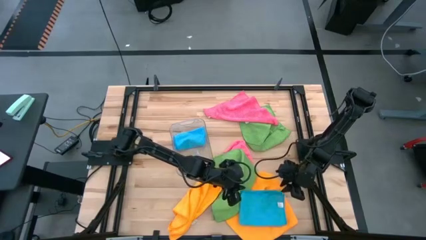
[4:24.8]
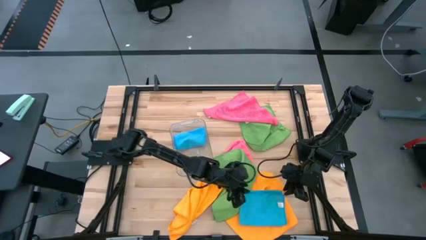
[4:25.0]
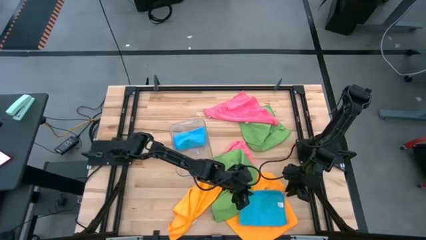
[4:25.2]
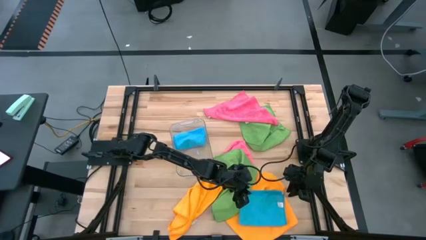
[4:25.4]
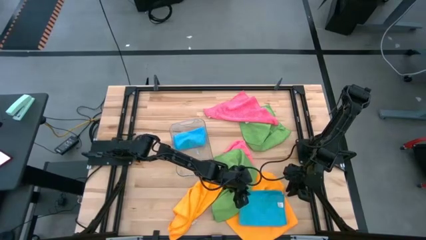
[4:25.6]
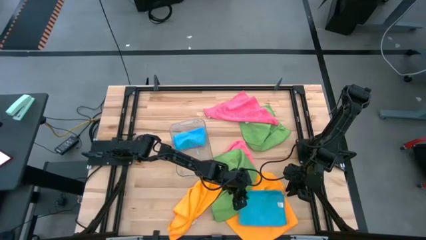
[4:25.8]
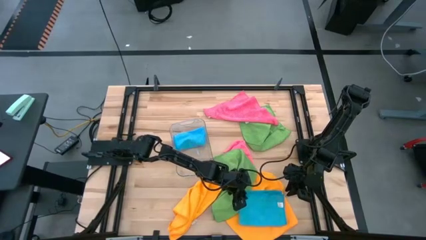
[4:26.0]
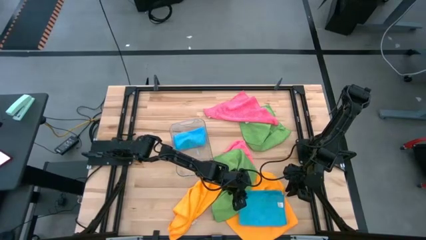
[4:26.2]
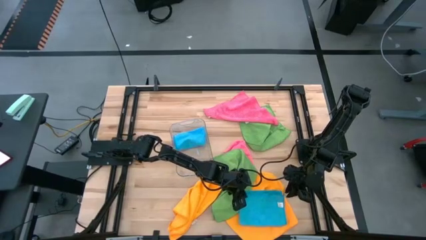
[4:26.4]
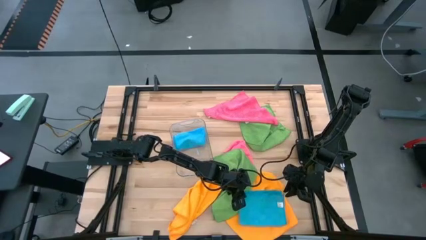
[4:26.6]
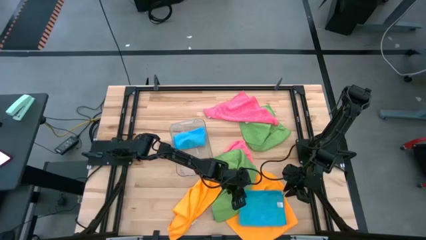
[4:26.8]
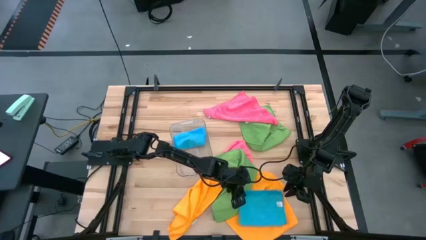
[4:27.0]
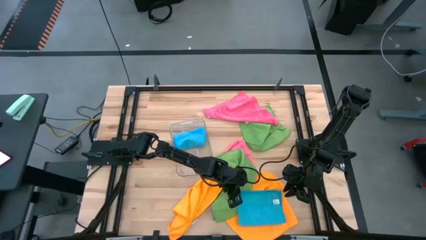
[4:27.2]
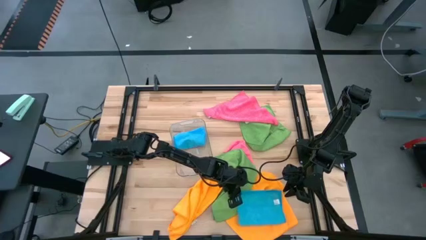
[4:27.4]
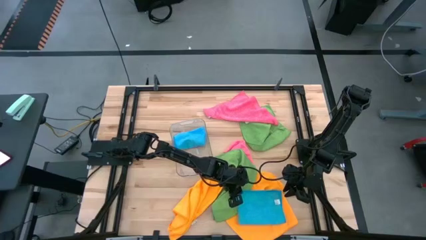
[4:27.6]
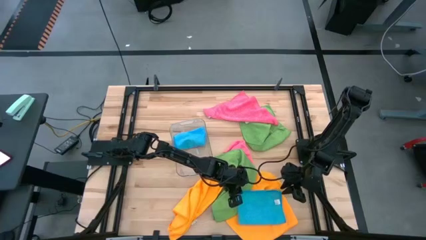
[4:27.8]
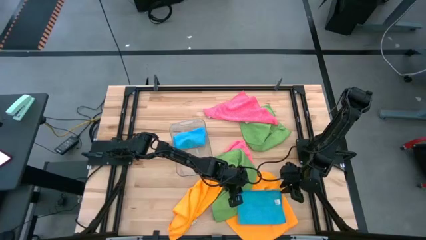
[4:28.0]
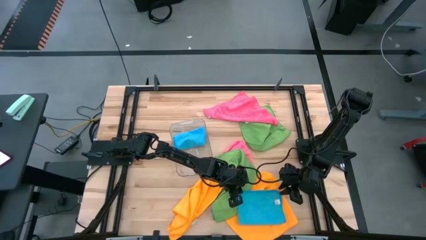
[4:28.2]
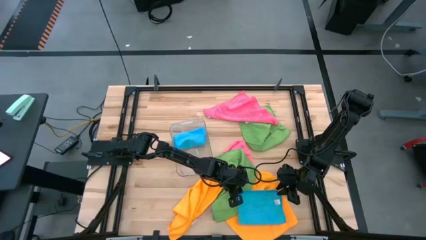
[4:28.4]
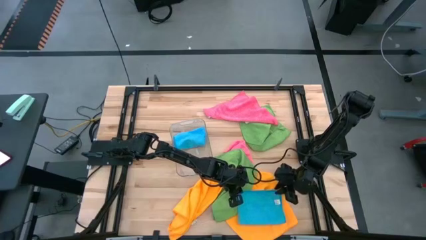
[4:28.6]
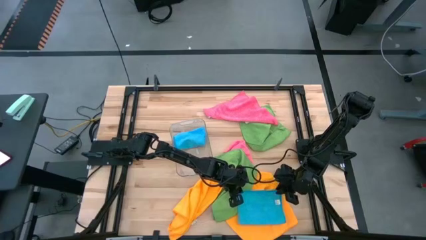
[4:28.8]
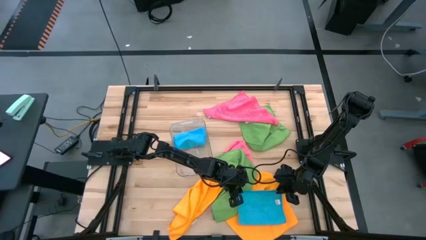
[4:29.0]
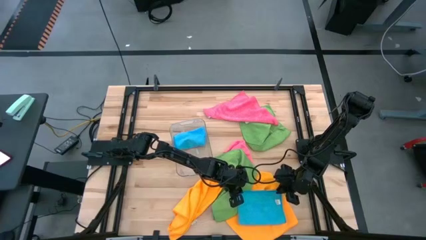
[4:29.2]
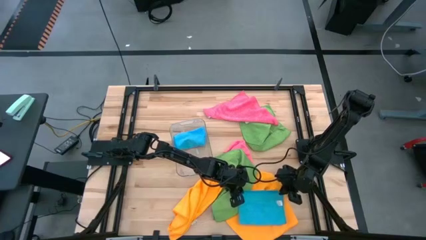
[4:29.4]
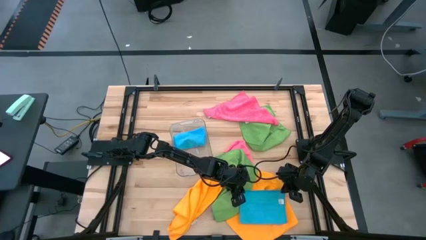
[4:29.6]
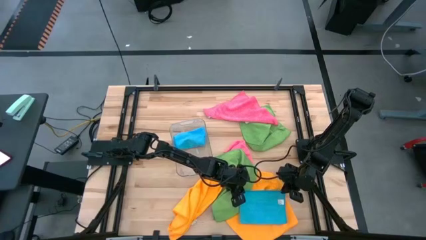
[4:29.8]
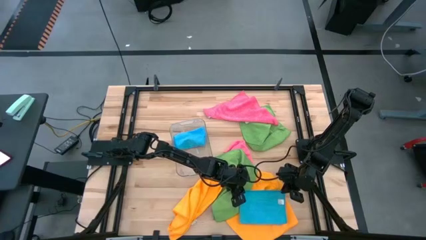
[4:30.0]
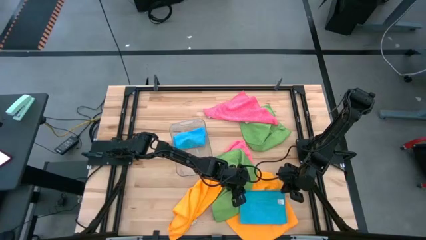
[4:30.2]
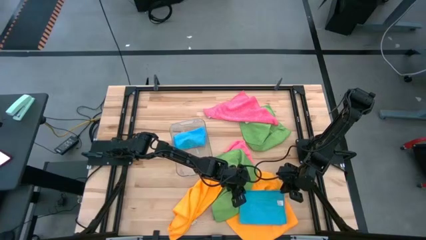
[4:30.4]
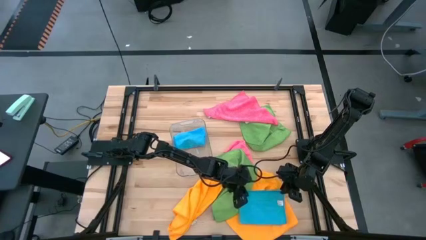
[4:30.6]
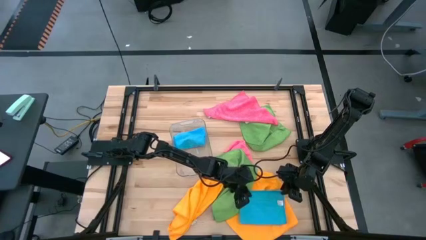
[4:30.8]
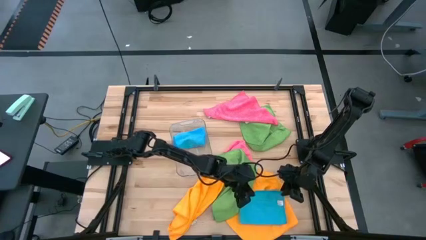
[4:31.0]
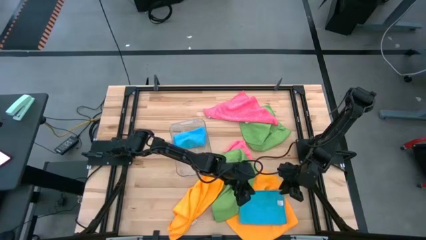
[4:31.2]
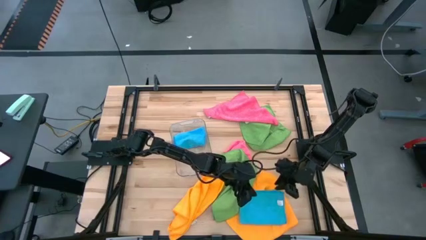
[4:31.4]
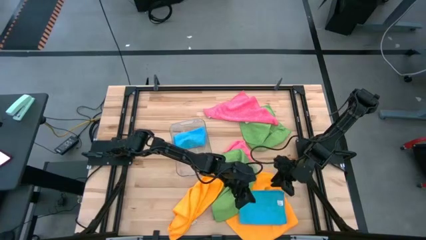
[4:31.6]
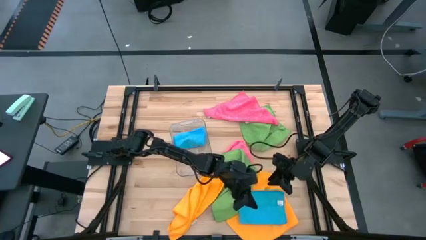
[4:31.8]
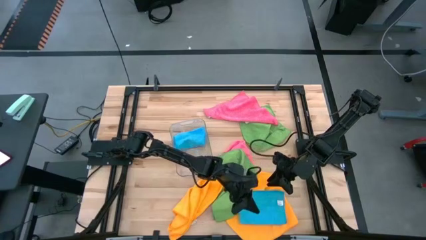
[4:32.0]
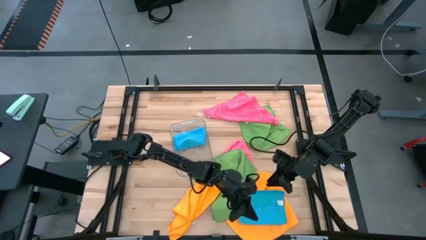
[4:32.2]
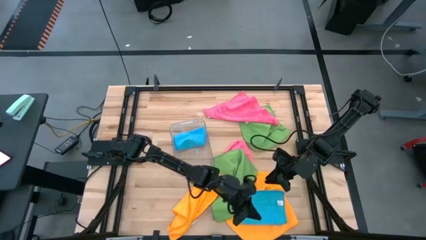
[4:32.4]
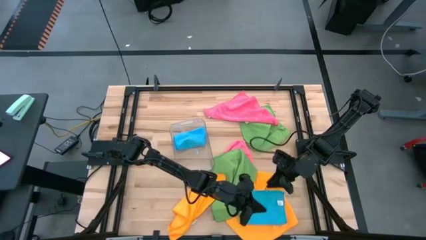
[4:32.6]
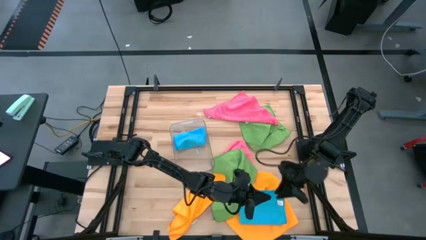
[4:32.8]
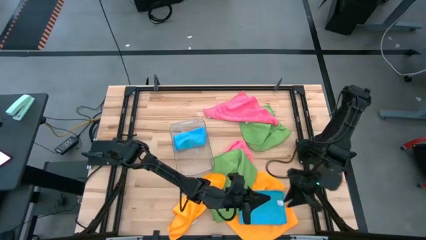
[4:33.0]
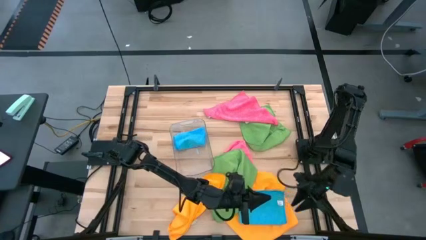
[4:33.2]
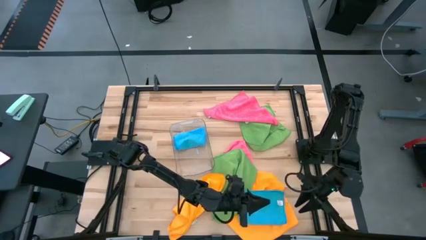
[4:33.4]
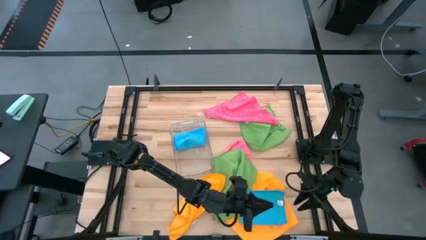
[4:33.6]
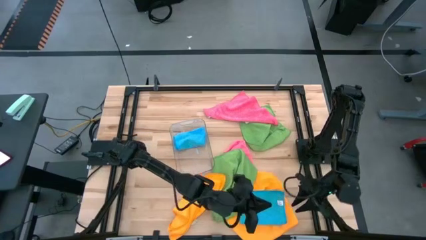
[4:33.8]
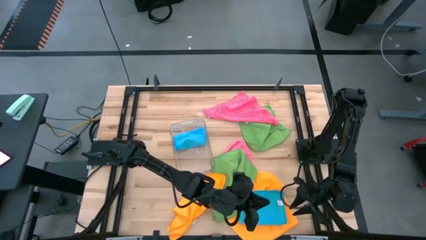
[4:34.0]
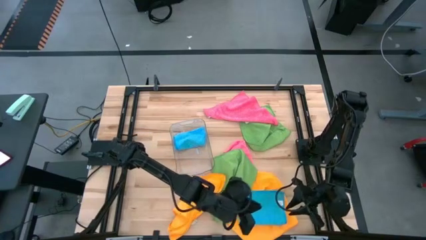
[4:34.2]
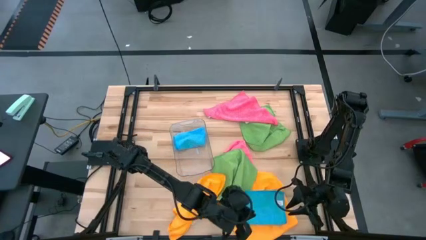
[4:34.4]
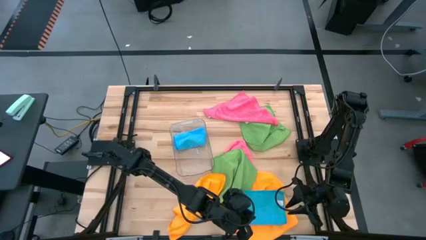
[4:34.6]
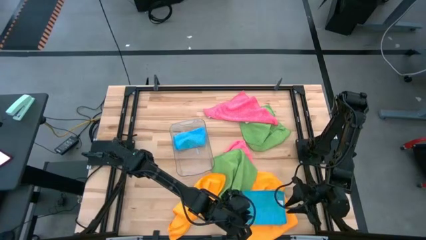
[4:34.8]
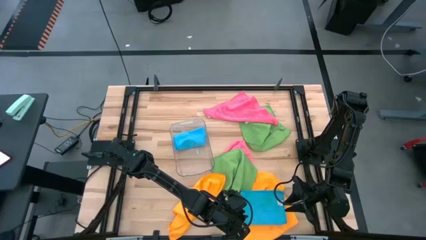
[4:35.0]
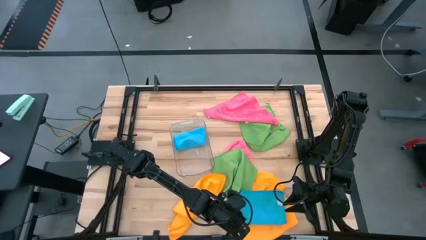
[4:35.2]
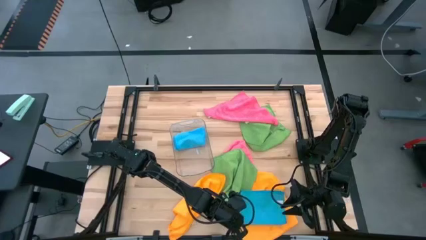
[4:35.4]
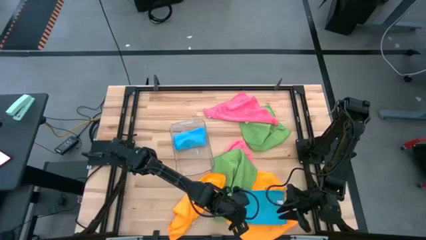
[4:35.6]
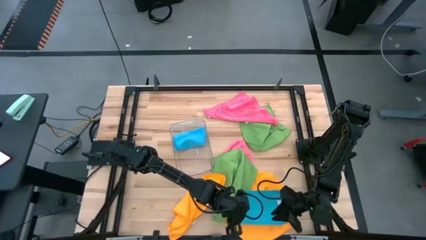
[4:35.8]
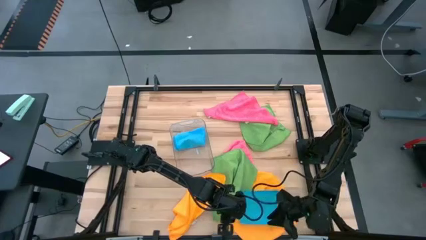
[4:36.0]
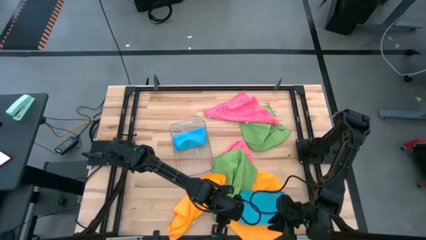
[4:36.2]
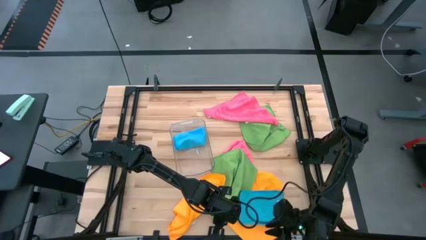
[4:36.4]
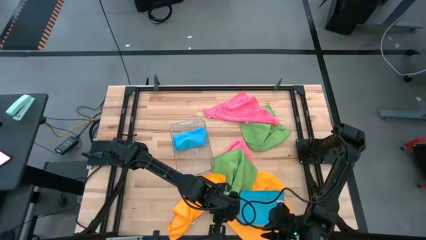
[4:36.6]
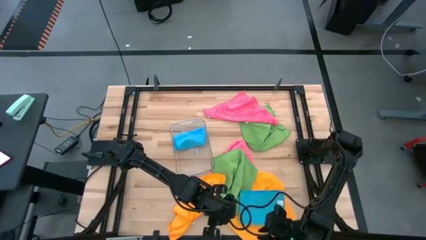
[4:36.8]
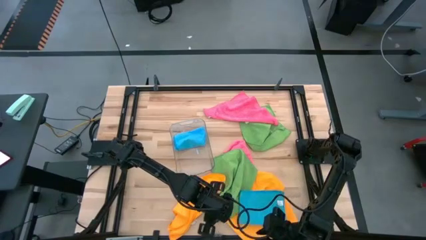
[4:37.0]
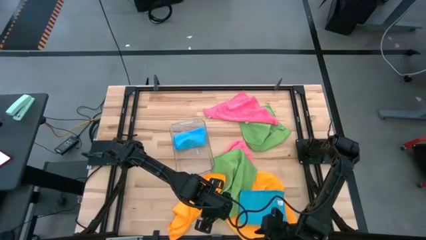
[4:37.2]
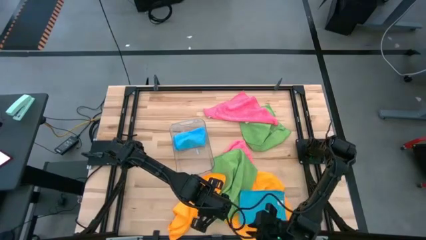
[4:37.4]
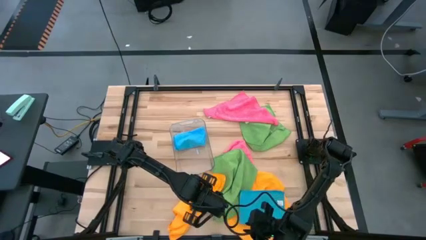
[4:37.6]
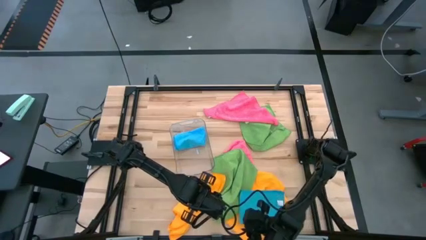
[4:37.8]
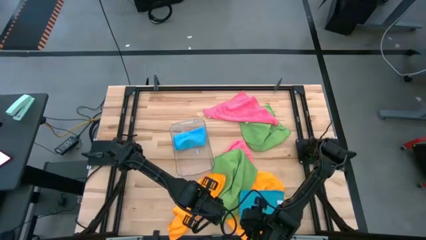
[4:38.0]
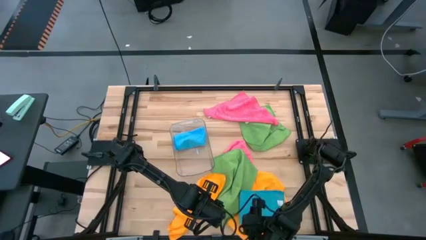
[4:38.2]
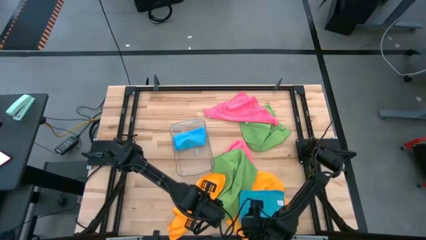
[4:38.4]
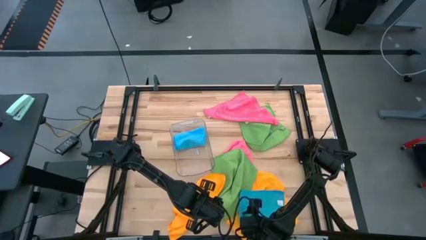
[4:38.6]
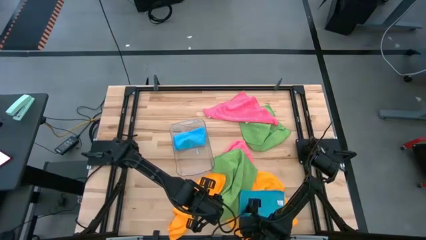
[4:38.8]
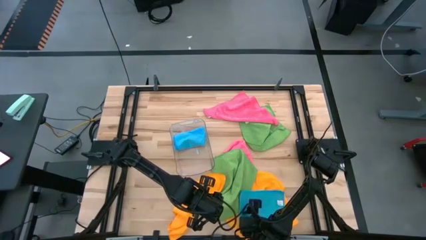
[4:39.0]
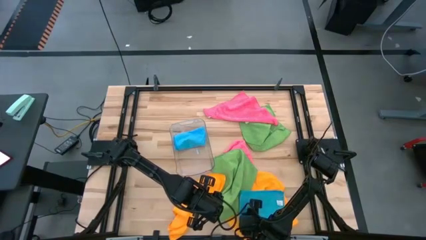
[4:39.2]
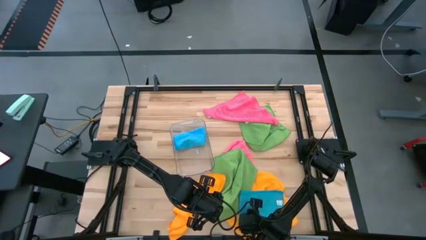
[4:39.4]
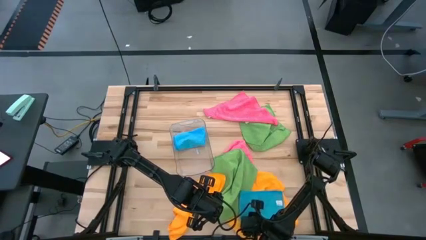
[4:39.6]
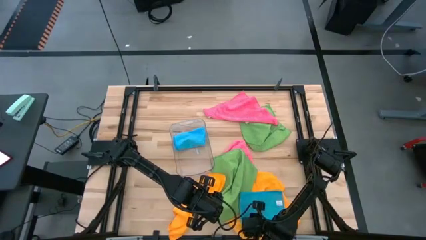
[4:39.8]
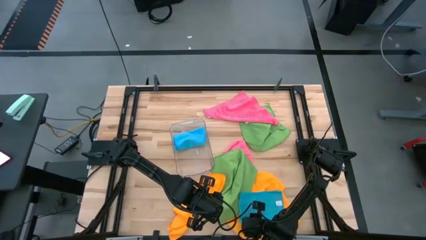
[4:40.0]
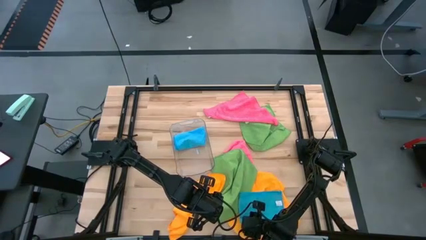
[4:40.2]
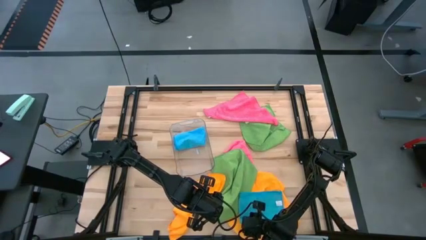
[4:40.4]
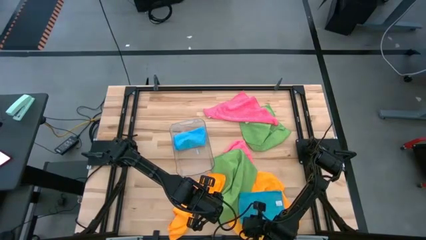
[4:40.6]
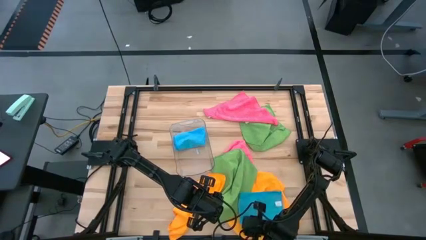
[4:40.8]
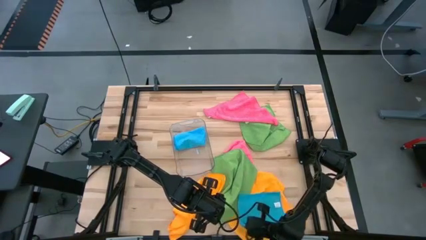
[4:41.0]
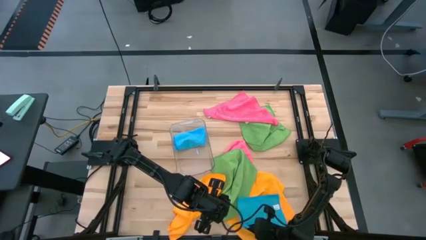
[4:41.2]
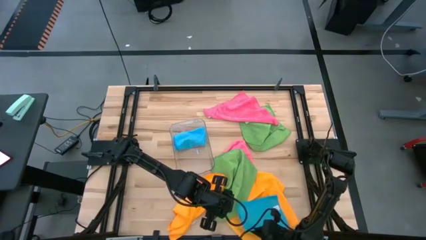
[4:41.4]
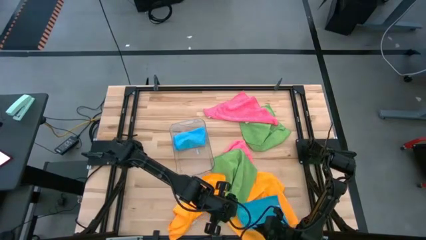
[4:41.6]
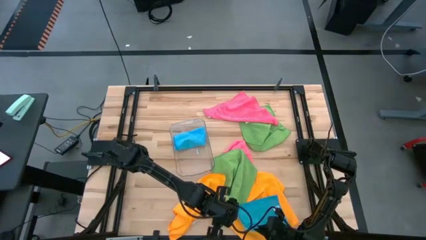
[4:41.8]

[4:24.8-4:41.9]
Task: Fold microfiber towels
Fold the blue towel
